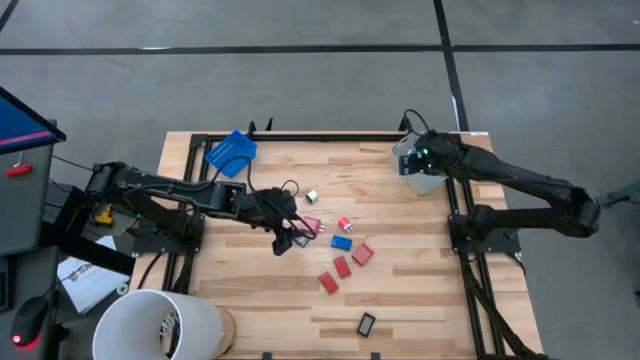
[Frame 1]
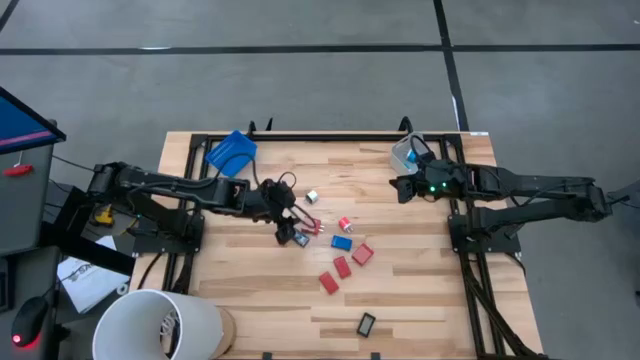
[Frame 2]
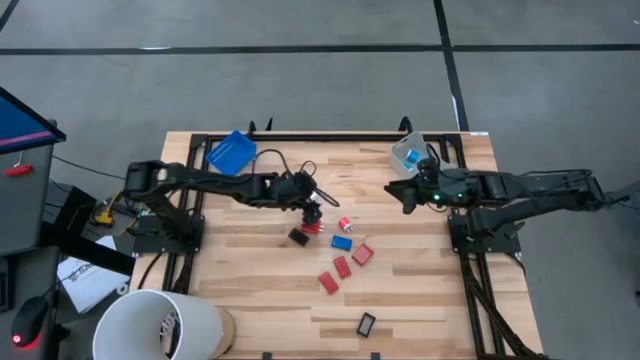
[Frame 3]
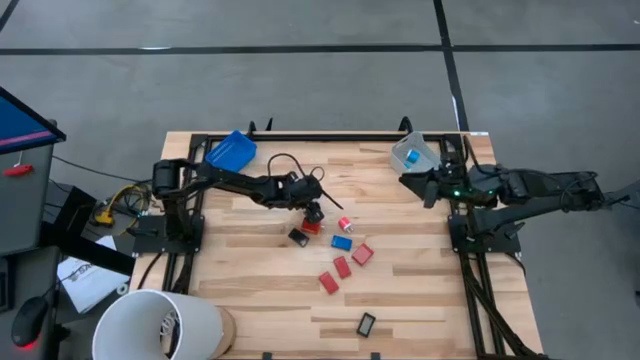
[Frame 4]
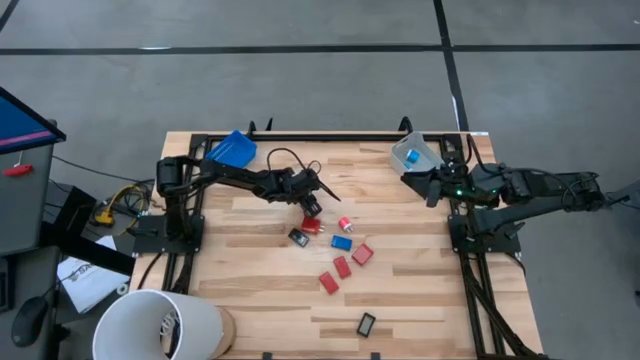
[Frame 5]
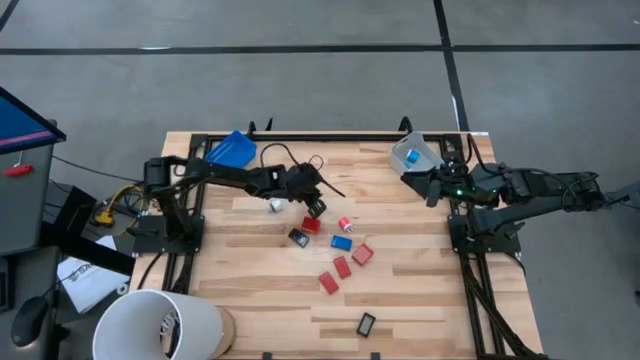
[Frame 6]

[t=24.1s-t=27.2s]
Task: Pick & Place Office items
Put the white charger into the gray bin

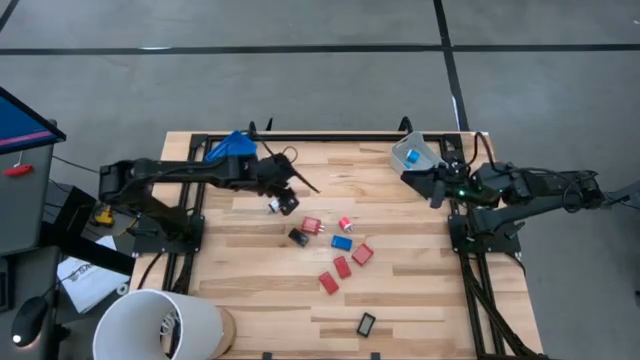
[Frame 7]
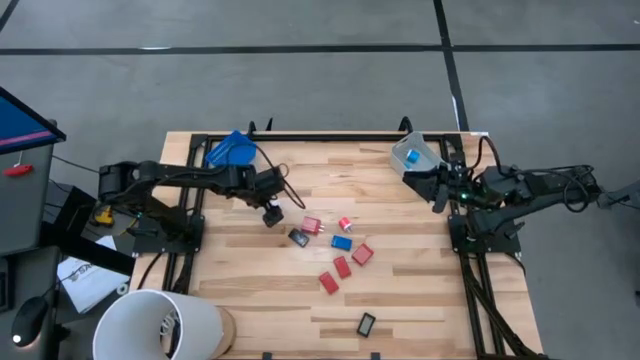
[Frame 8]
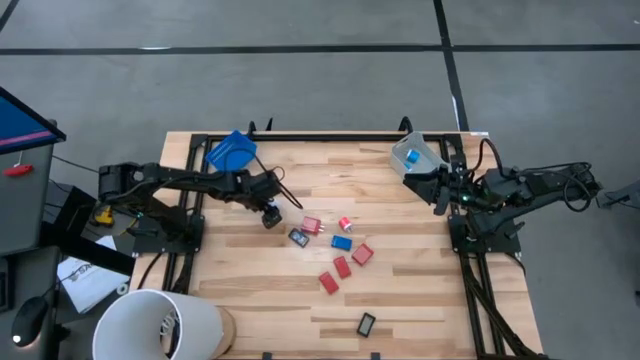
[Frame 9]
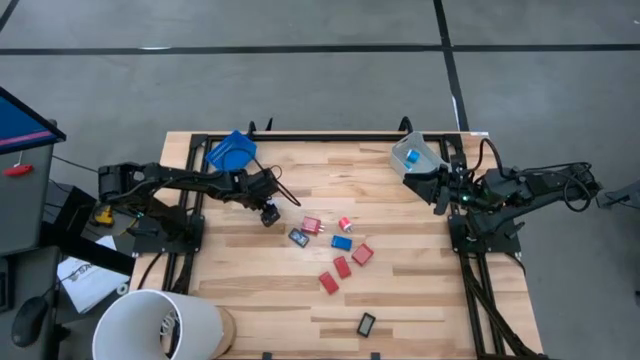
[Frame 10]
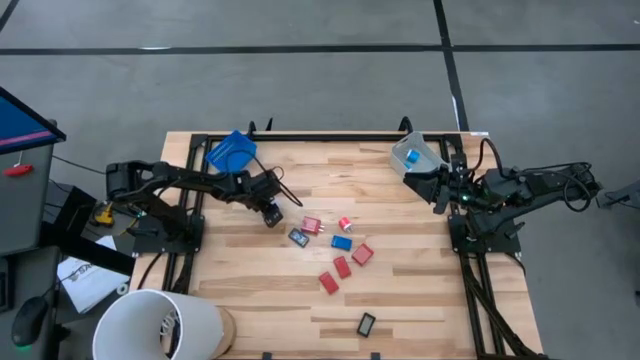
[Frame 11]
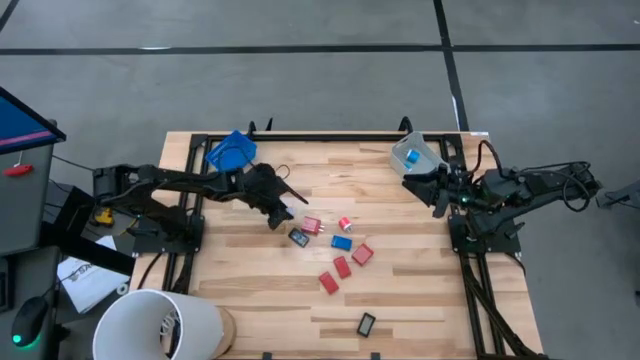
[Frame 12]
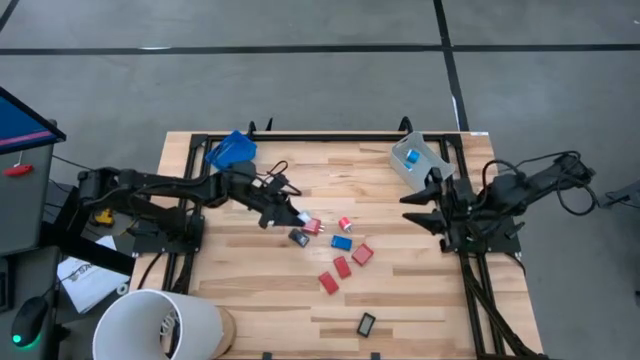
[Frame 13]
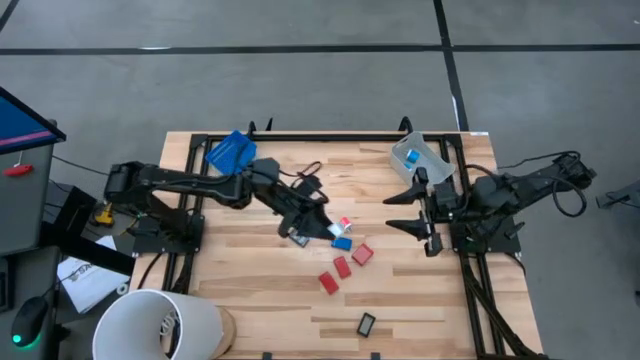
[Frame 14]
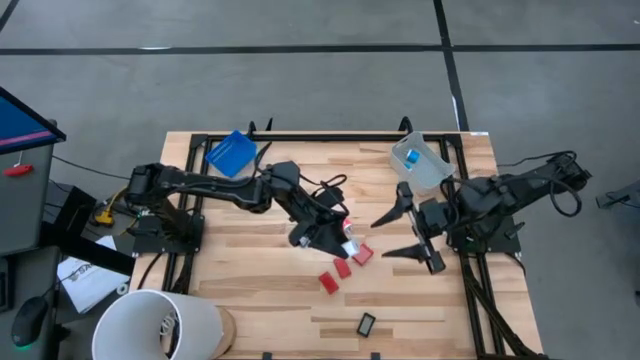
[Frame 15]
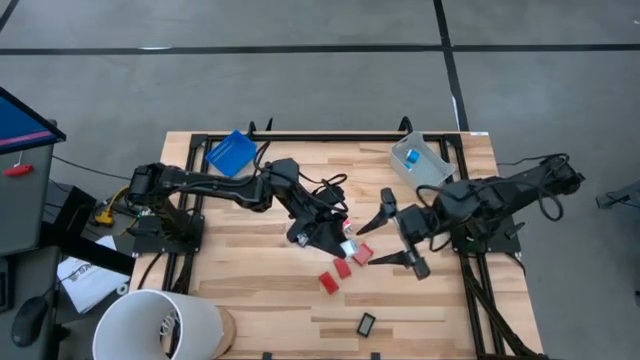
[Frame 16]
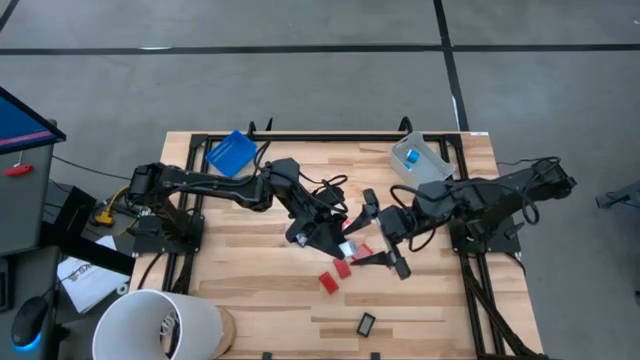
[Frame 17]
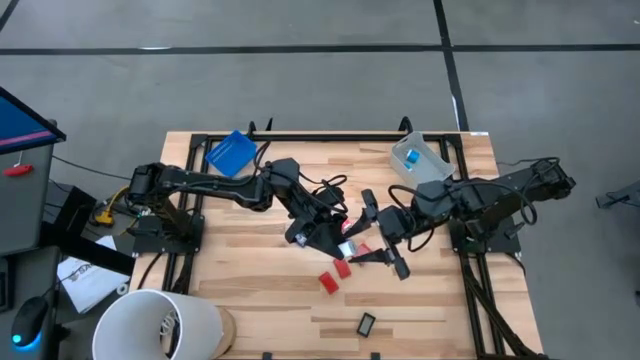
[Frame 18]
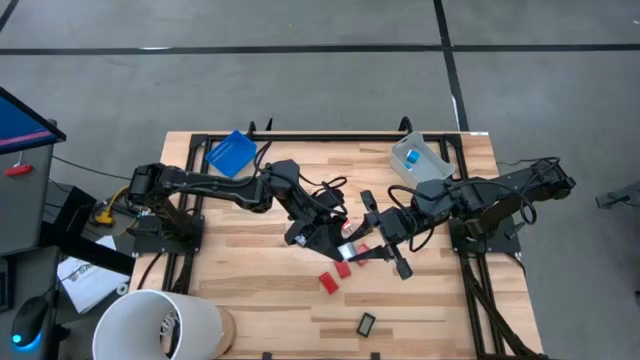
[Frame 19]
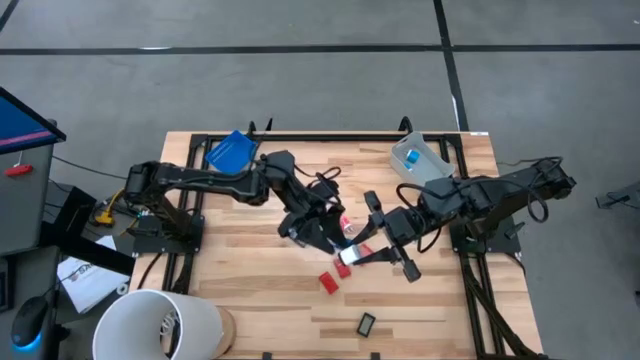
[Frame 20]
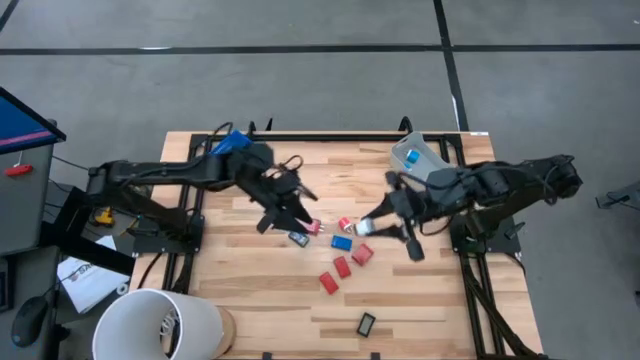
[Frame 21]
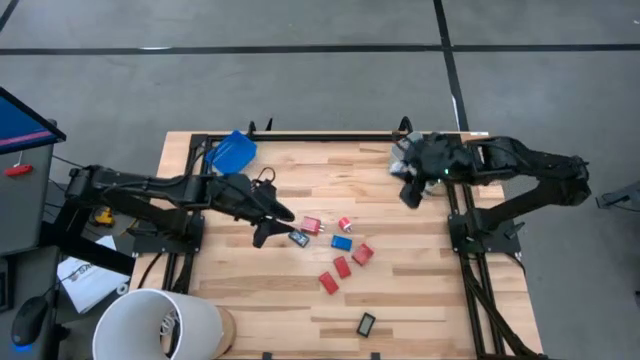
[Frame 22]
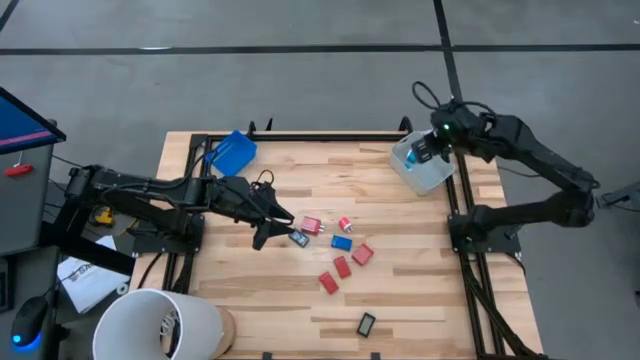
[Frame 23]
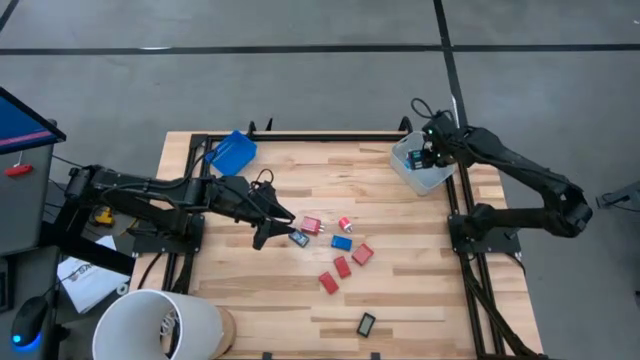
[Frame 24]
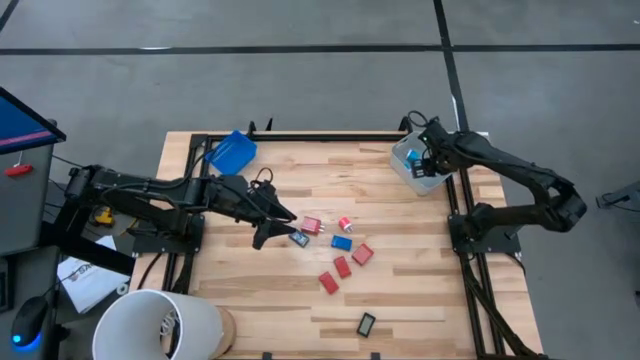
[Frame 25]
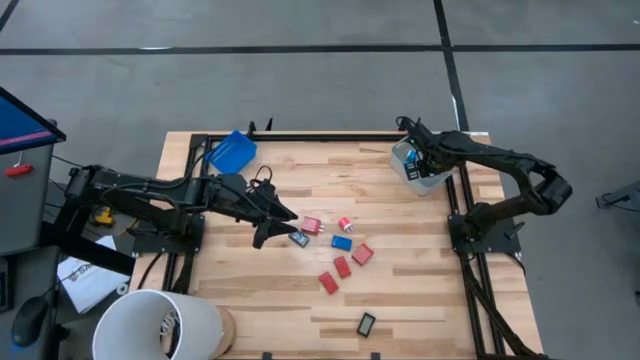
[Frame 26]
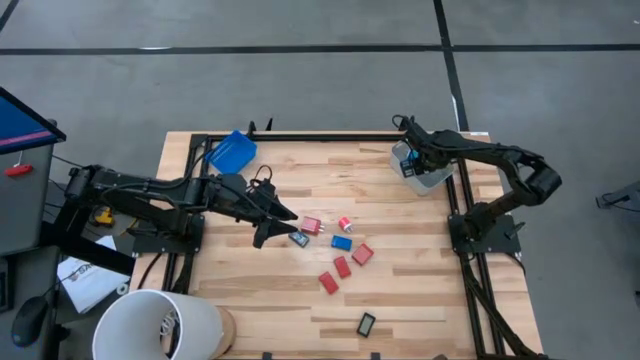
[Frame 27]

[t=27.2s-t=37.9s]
Put the white charger into the gray bin

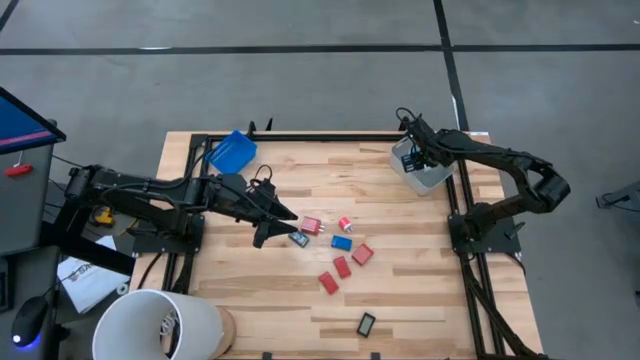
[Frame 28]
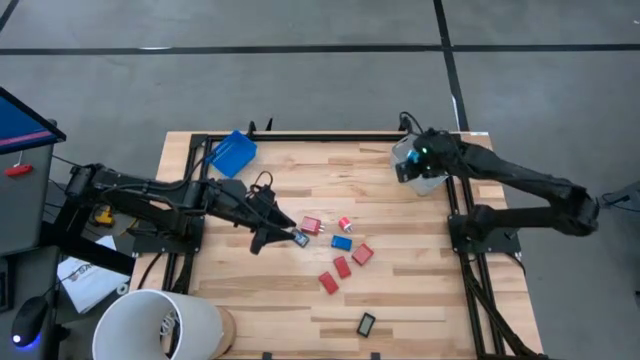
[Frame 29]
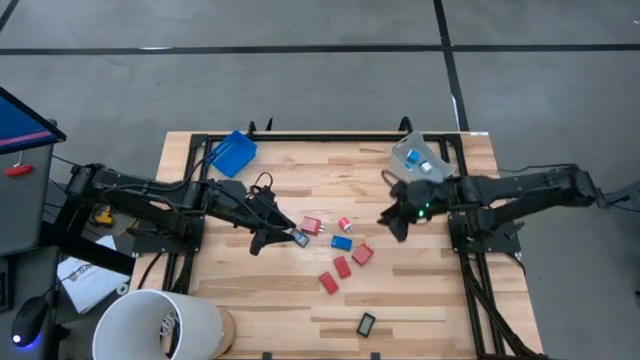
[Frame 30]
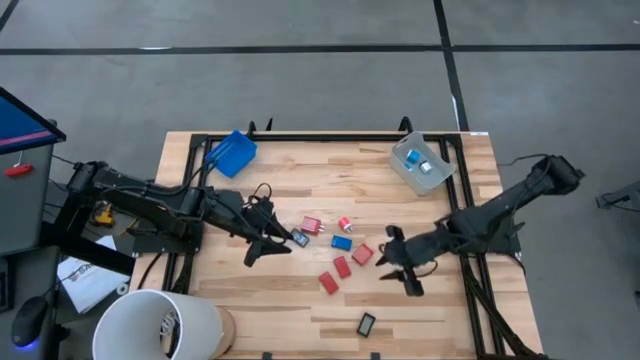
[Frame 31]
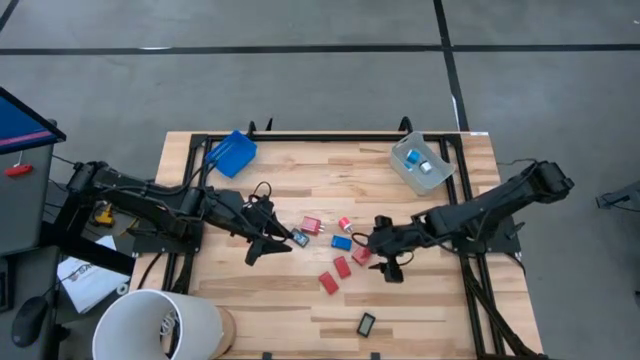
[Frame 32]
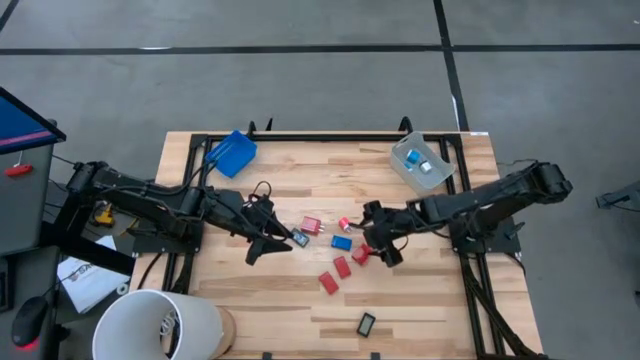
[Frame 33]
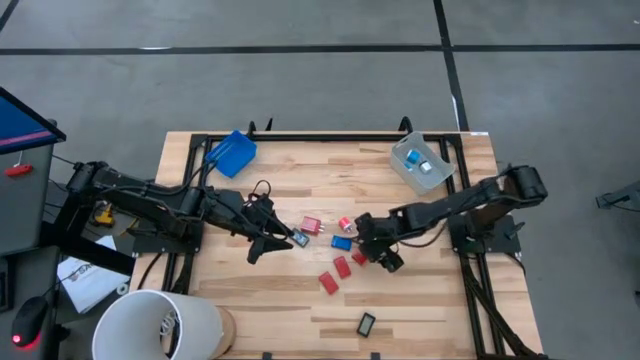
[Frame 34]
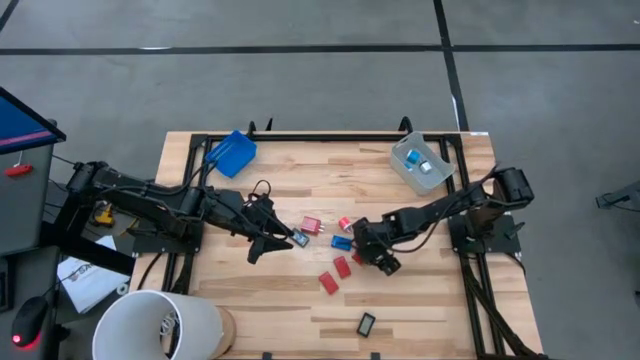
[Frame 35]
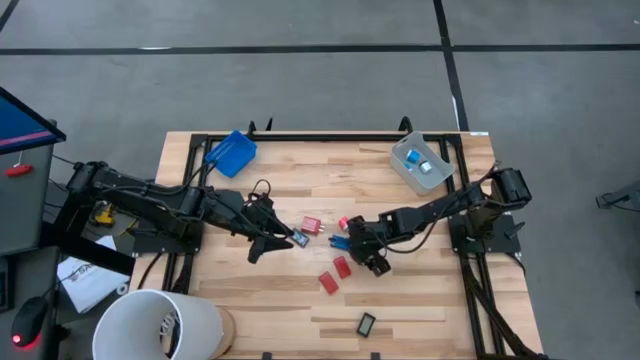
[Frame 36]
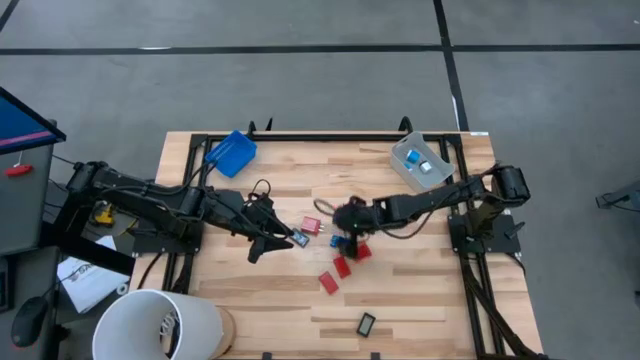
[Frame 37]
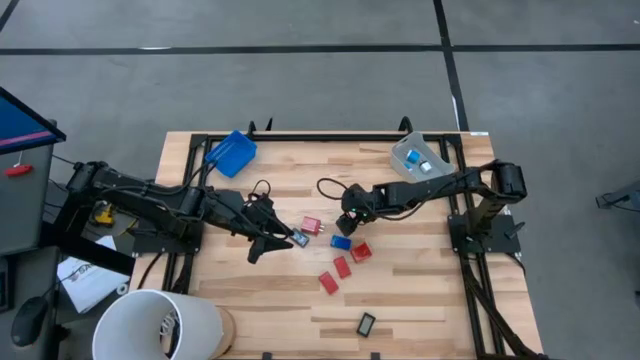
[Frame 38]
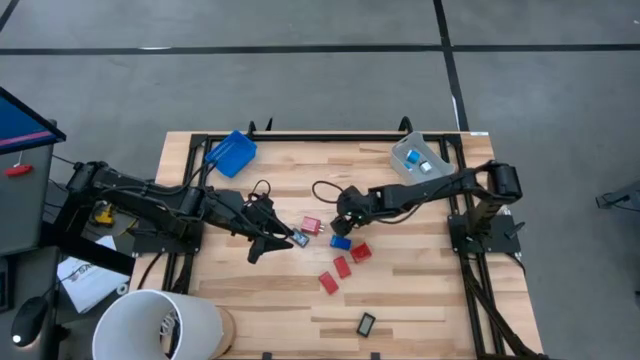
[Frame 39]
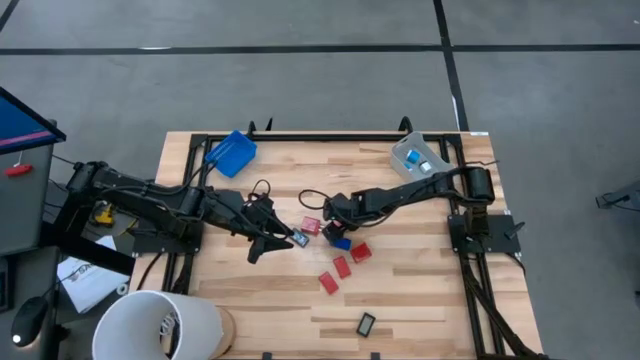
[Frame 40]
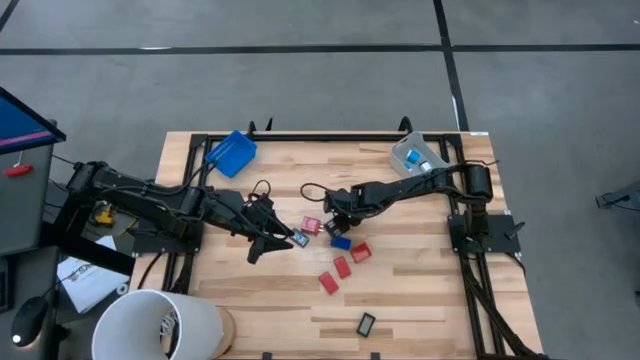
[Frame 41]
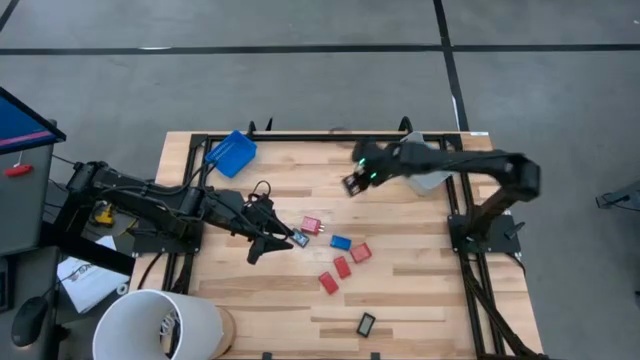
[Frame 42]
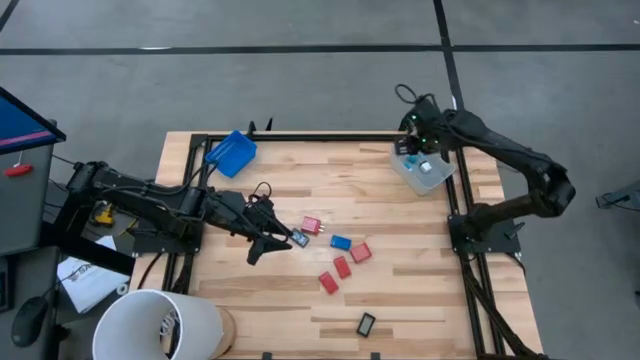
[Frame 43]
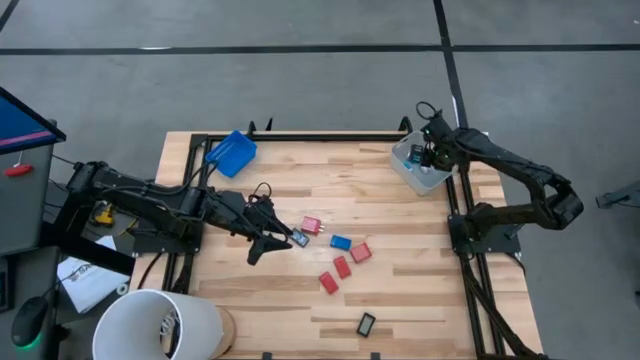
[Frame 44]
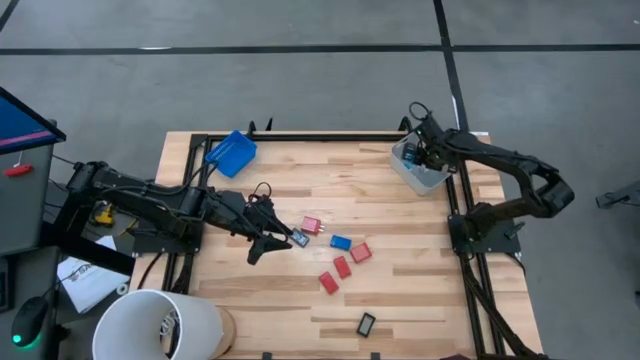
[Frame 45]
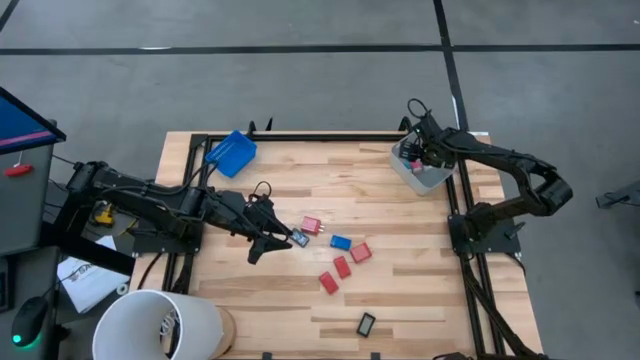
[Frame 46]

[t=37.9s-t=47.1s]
Put the pink charger into the gray bin
